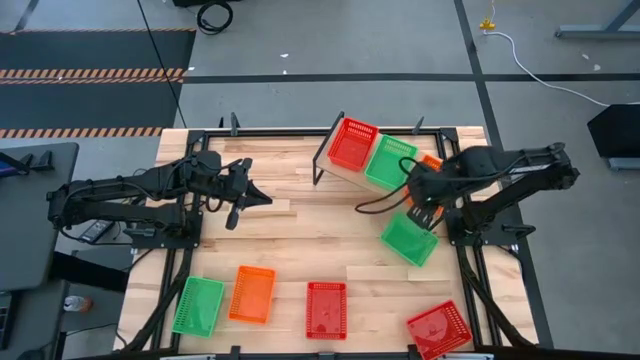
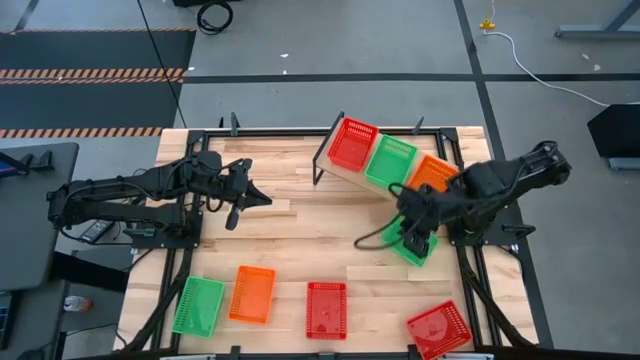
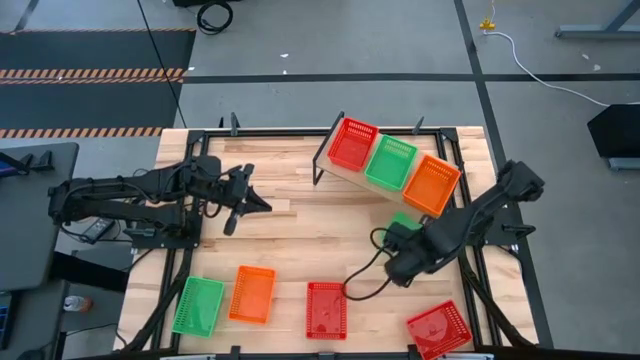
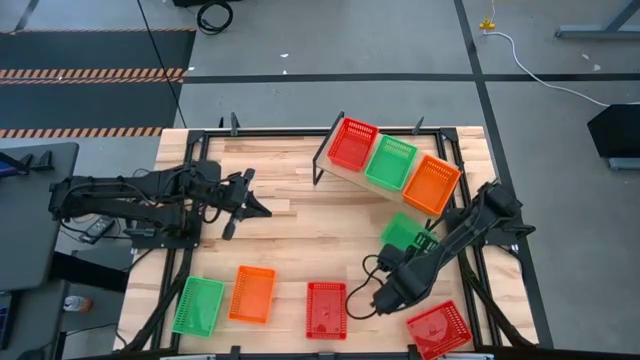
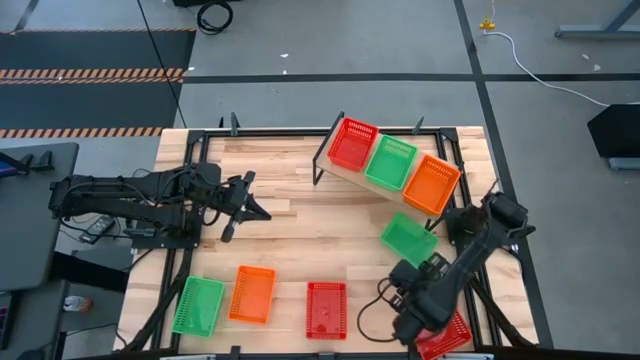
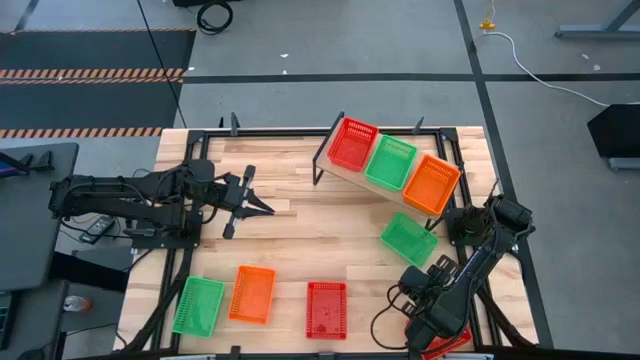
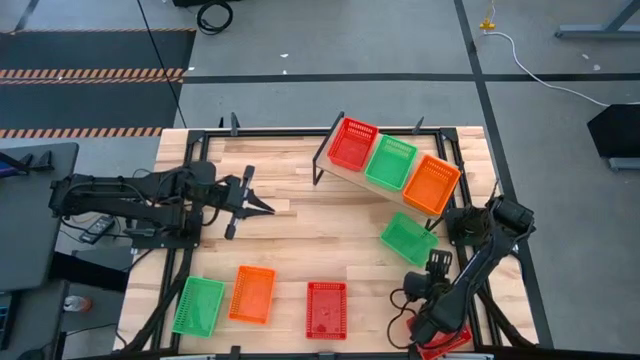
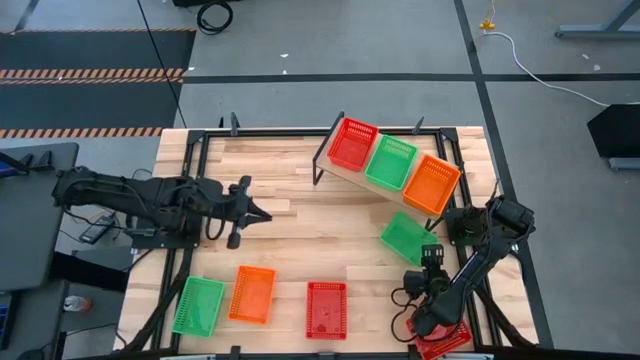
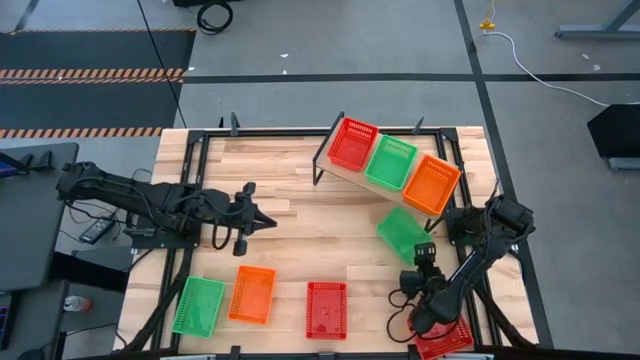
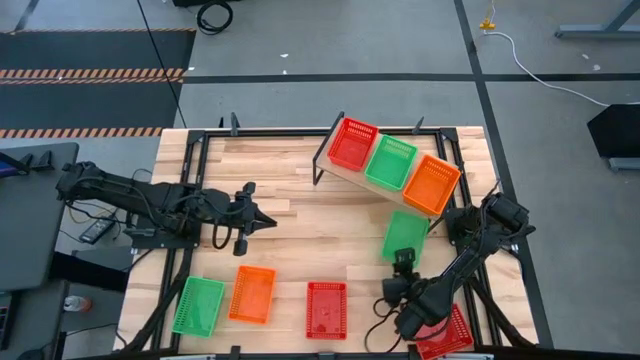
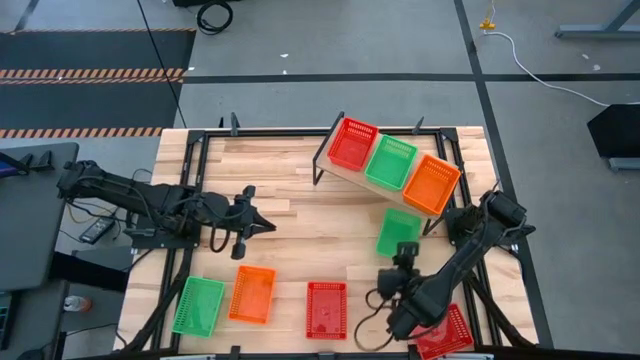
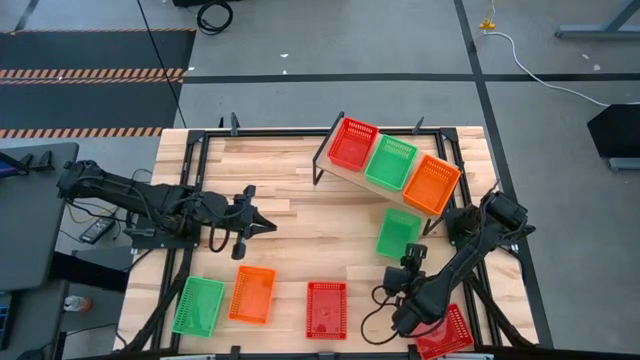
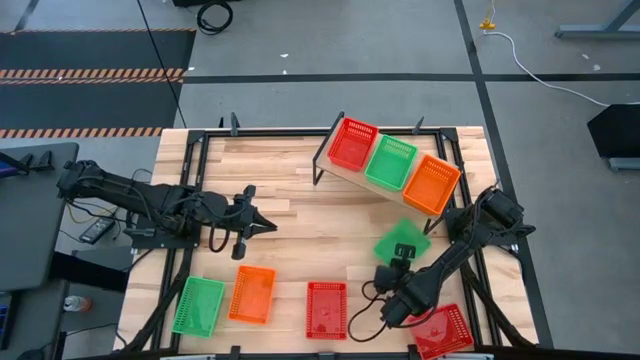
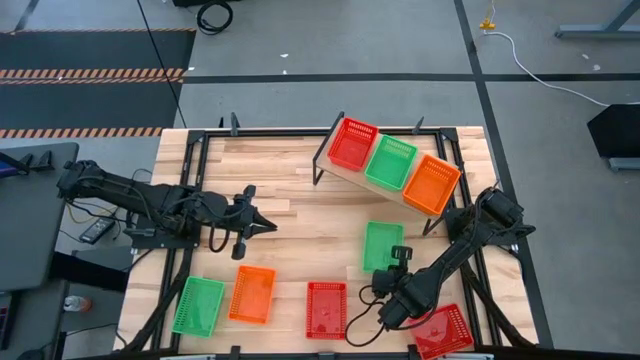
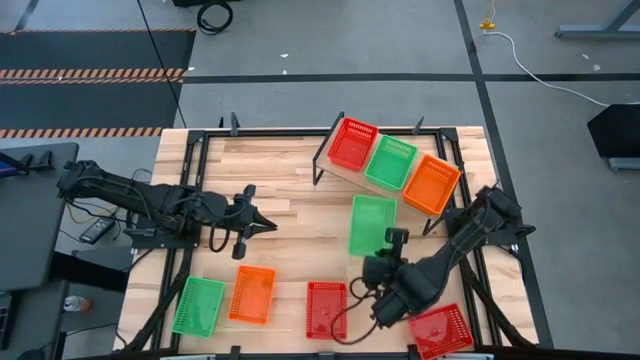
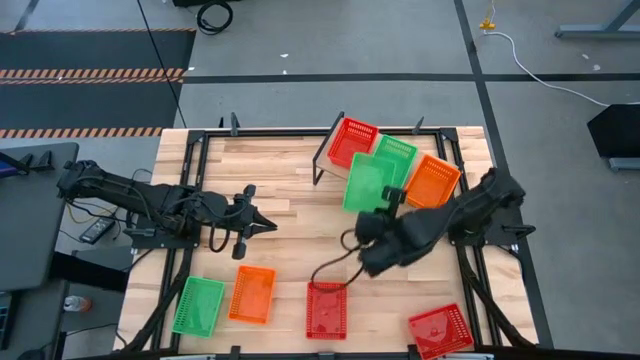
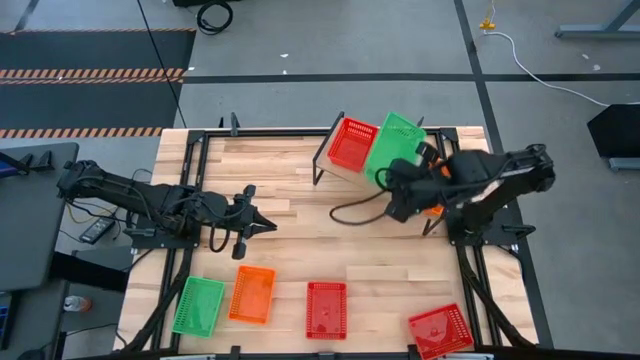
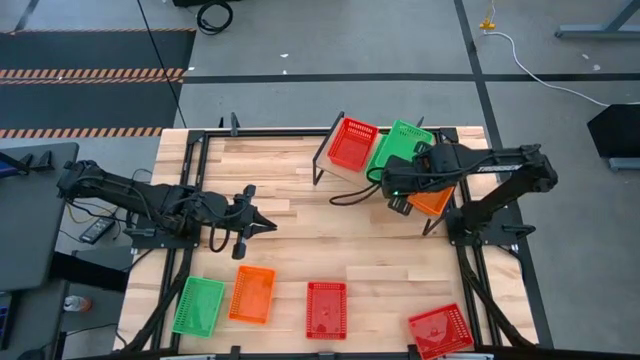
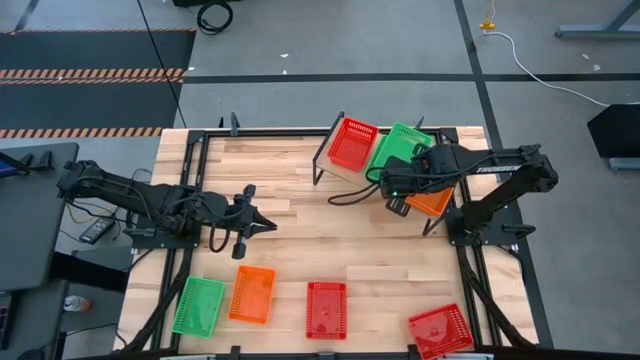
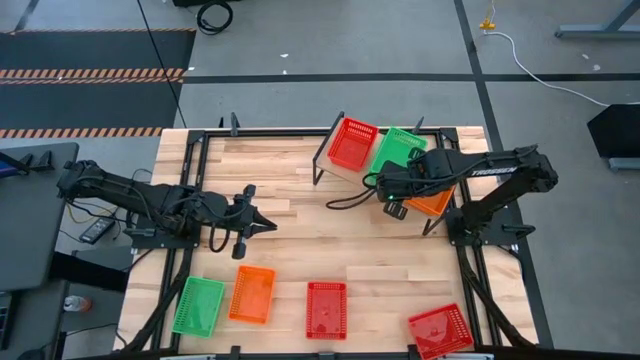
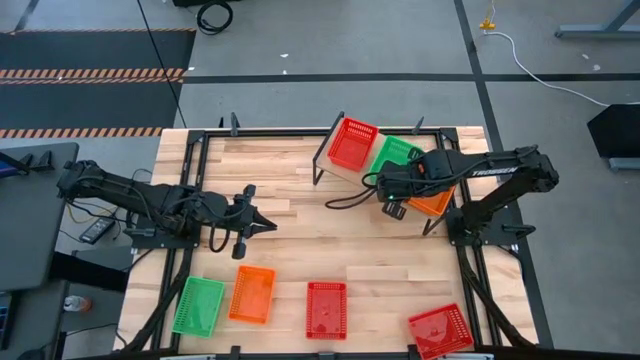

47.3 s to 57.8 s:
Task: Stack baskets on shelf by color
Stack the top green bin on the green bin on the shelf

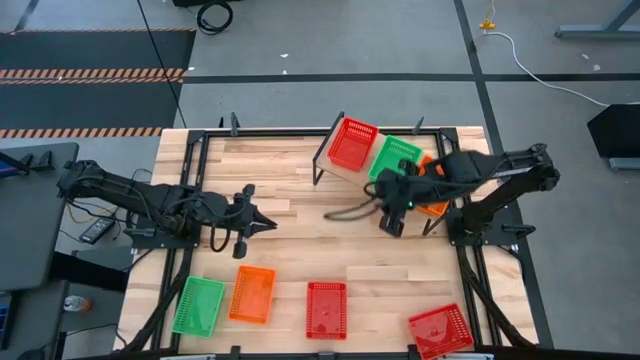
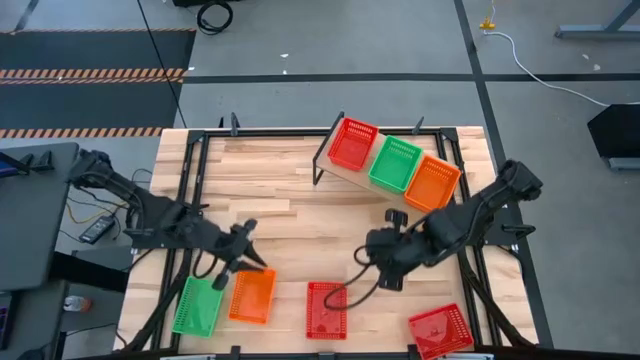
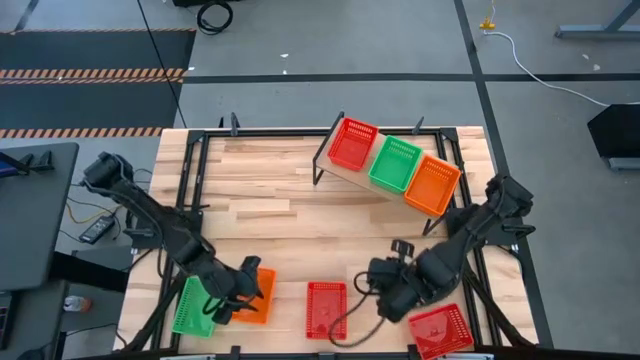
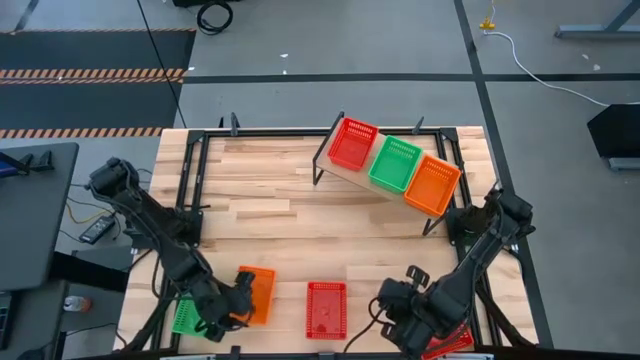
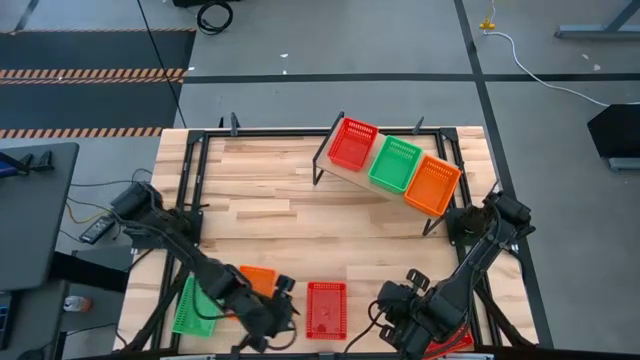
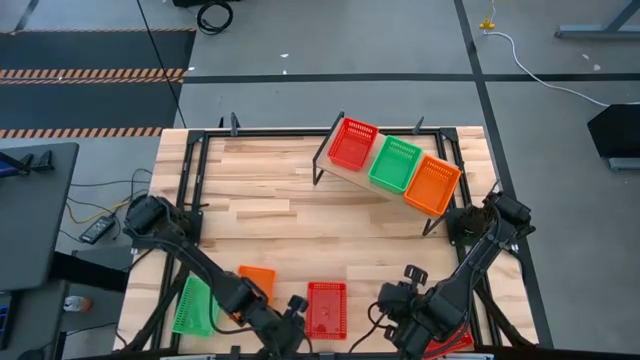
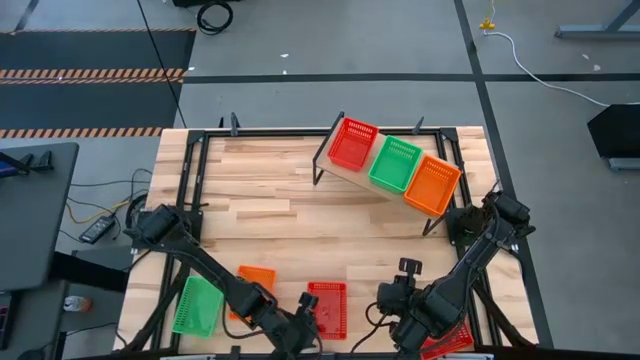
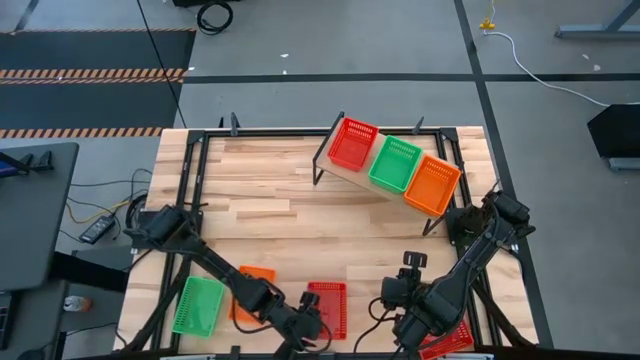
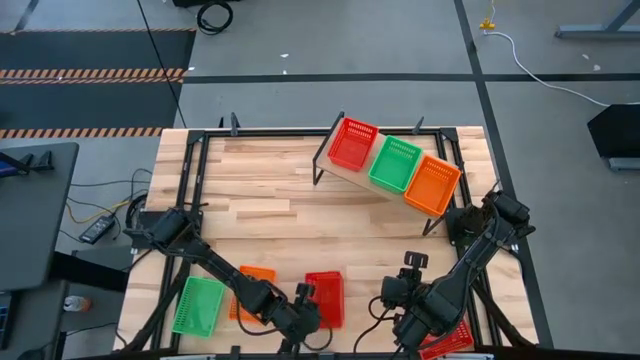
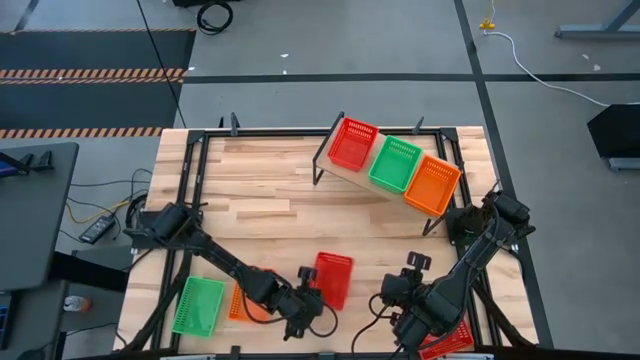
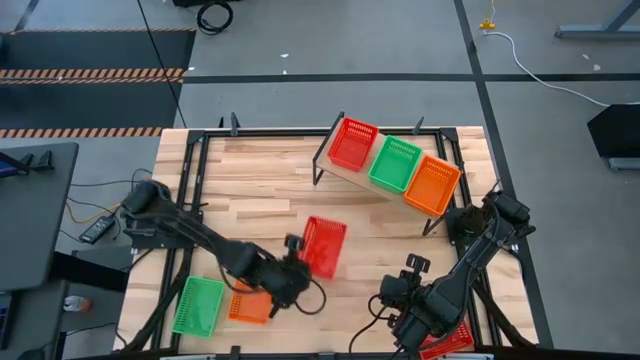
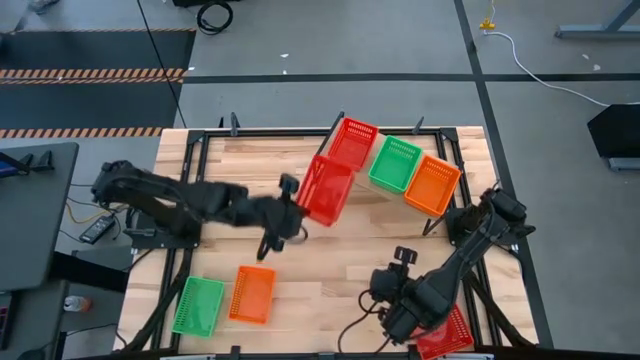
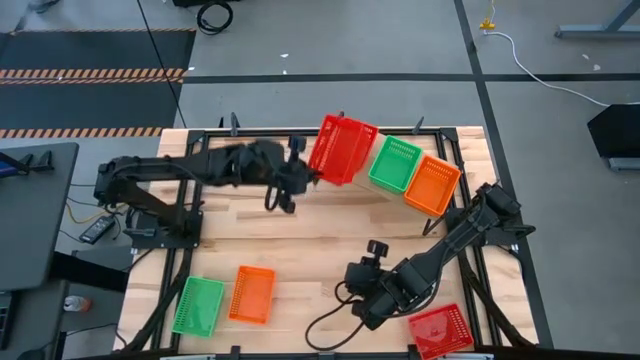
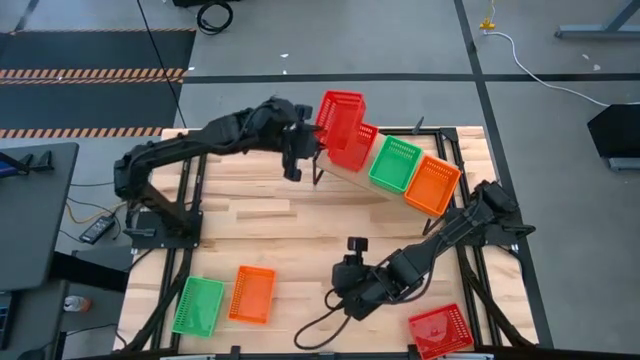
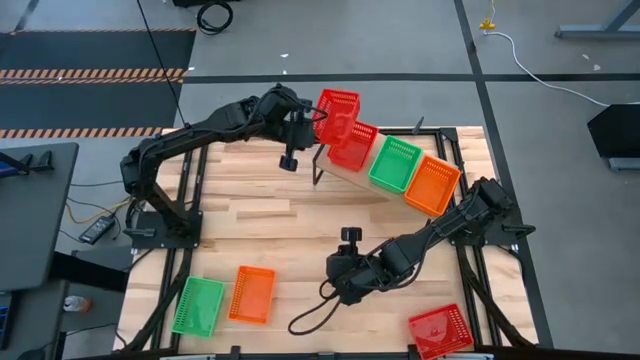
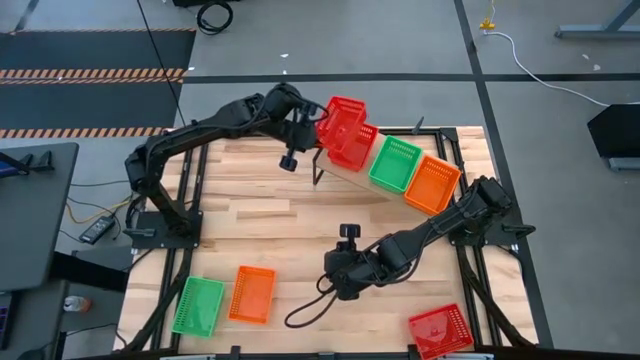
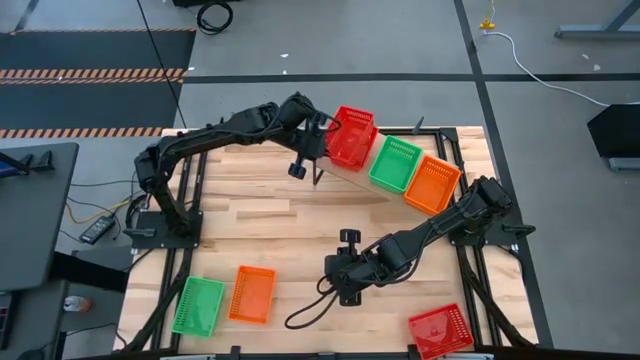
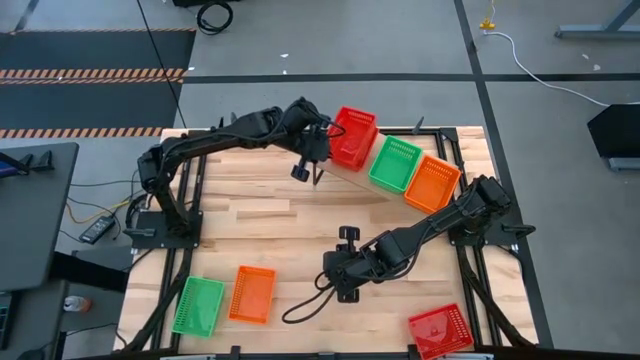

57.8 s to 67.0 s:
Stack the left red bin on the red bin on the shelf

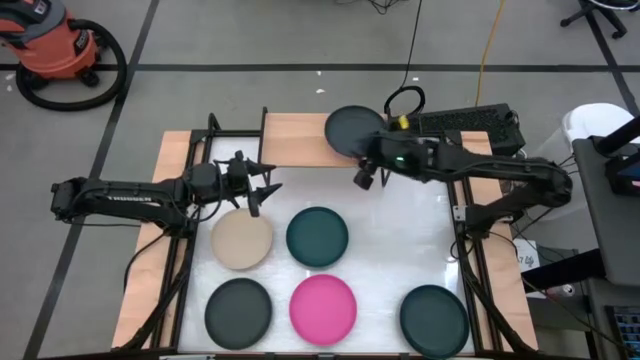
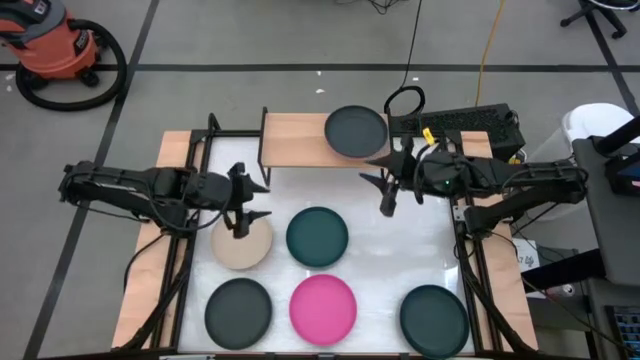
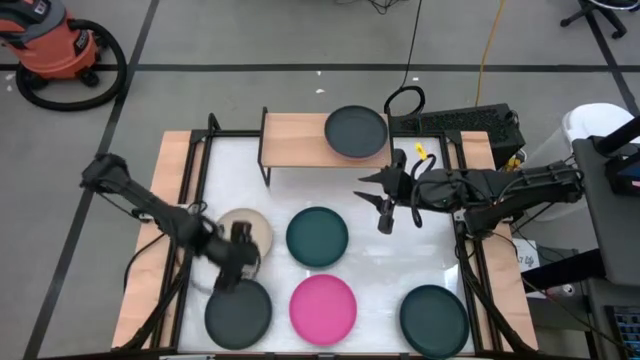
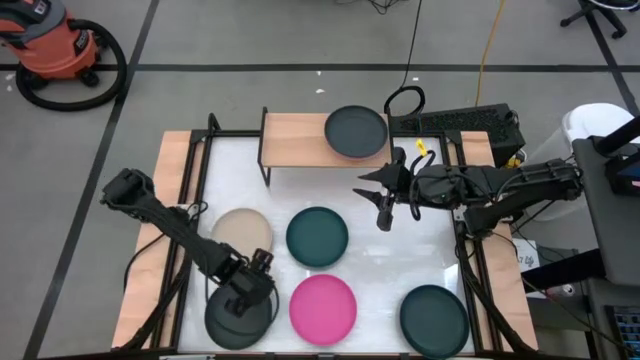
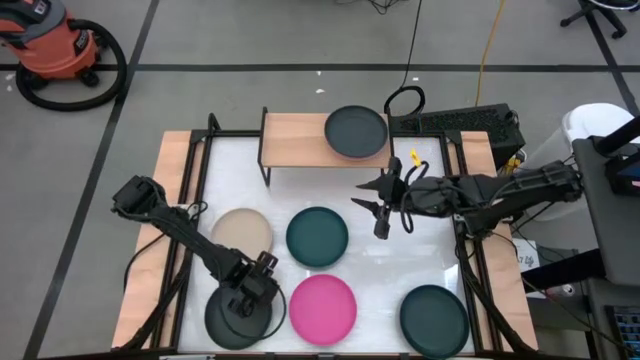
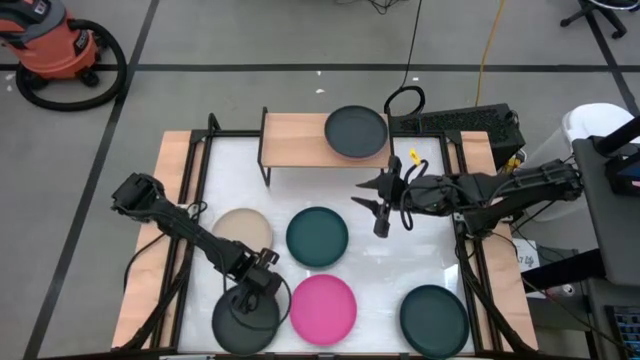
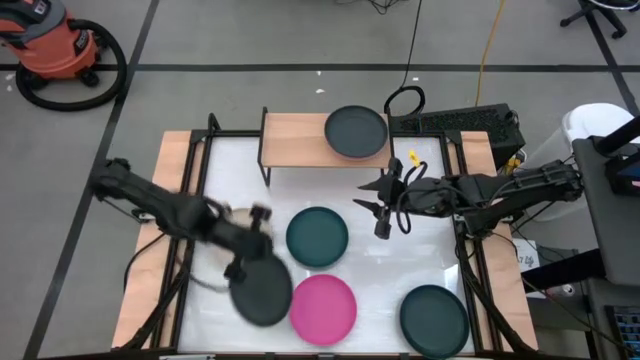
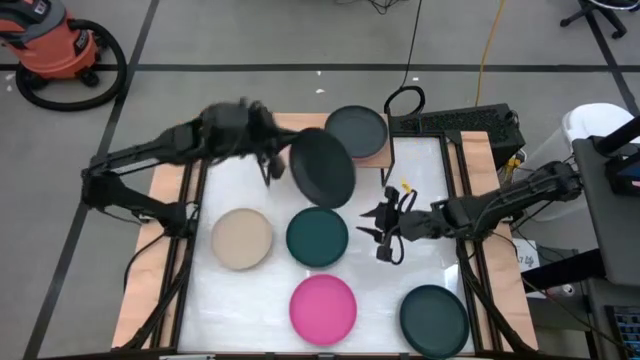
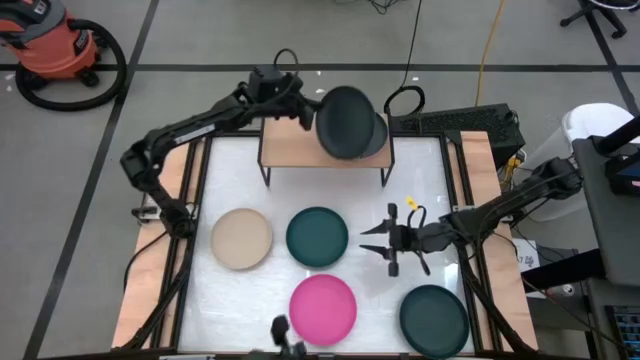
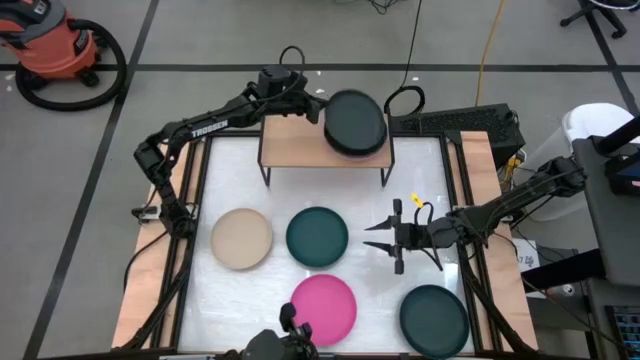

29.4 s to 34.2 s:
Task: Place and stack plates onto a shelf
Stack the black plate on the black plate
